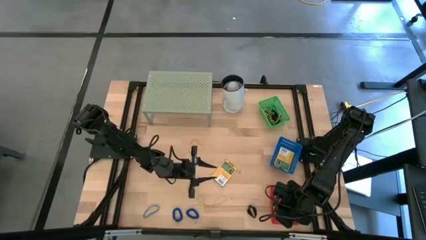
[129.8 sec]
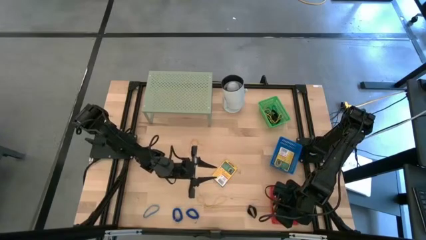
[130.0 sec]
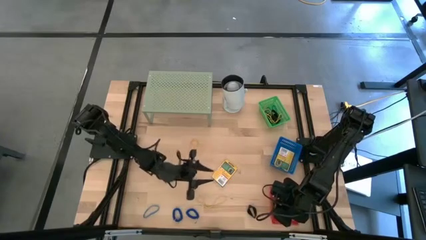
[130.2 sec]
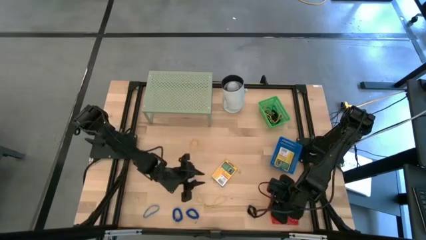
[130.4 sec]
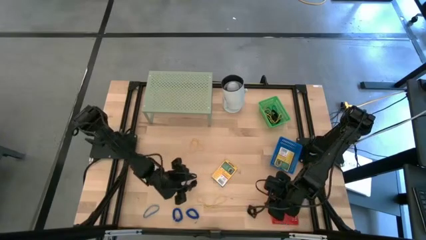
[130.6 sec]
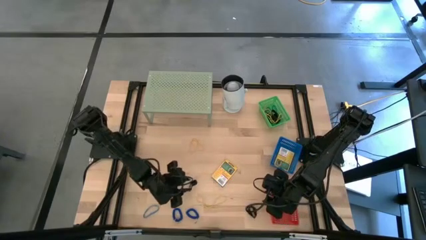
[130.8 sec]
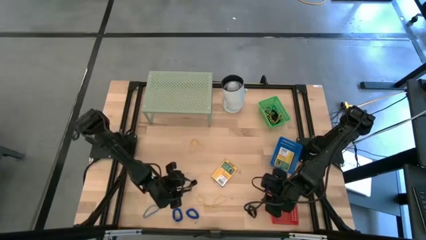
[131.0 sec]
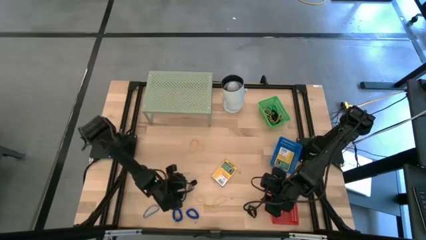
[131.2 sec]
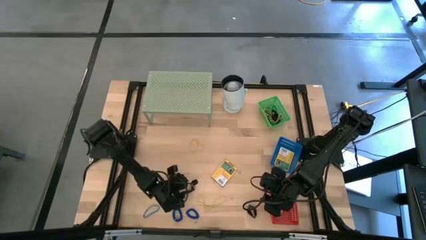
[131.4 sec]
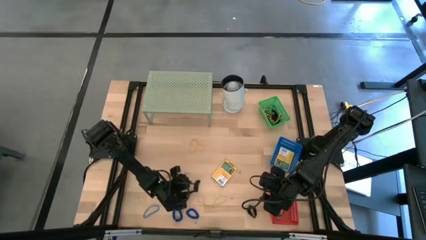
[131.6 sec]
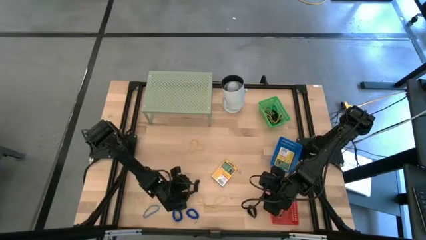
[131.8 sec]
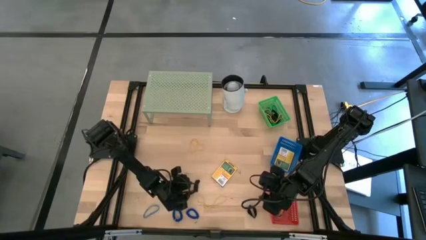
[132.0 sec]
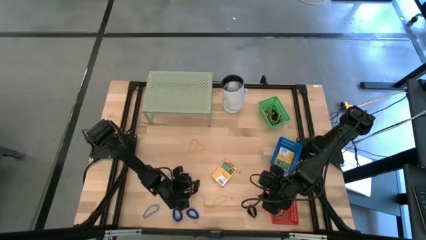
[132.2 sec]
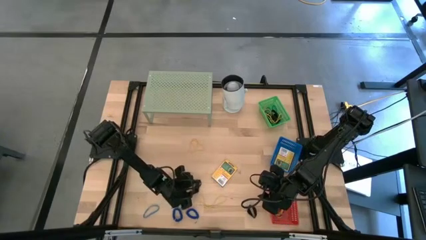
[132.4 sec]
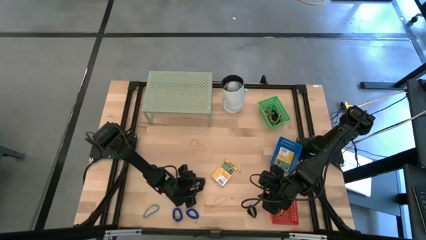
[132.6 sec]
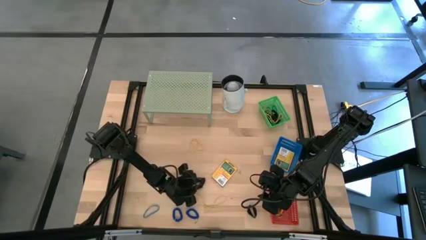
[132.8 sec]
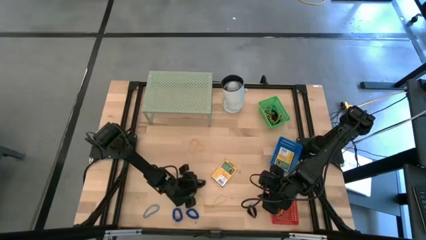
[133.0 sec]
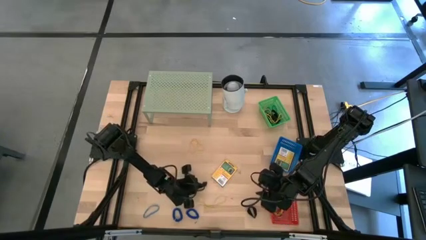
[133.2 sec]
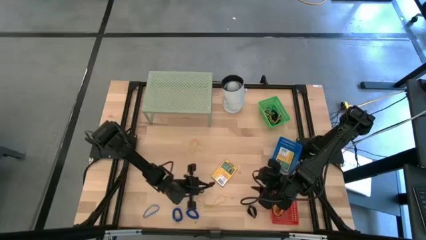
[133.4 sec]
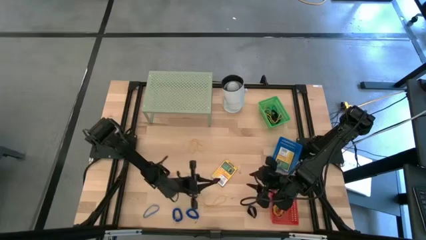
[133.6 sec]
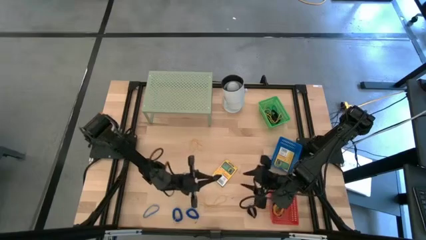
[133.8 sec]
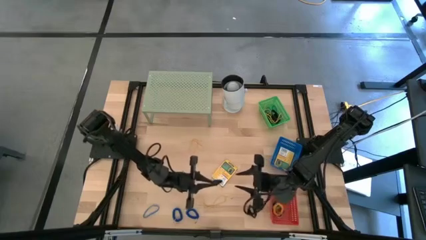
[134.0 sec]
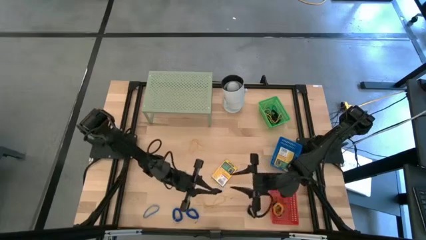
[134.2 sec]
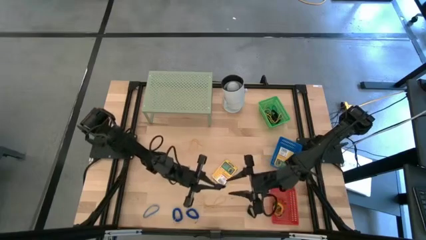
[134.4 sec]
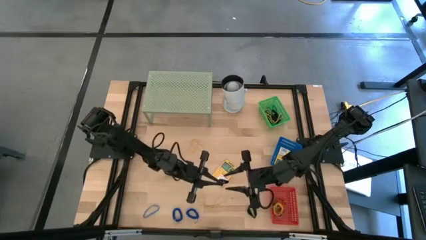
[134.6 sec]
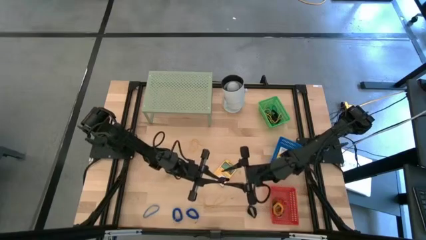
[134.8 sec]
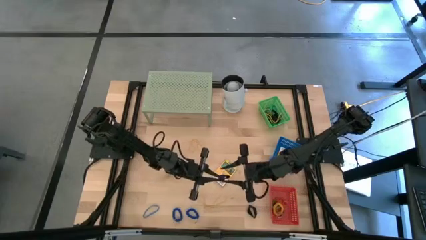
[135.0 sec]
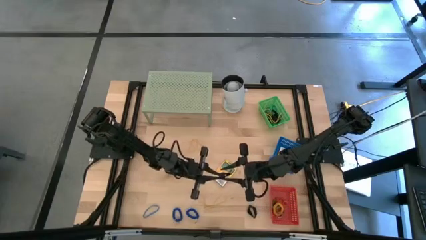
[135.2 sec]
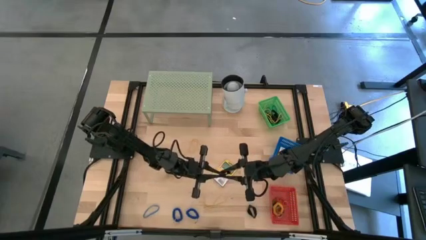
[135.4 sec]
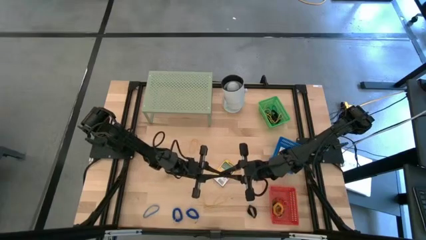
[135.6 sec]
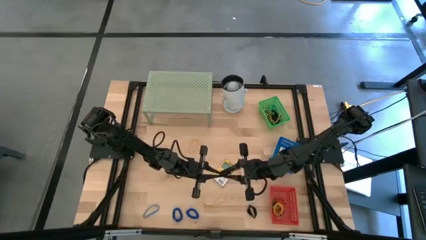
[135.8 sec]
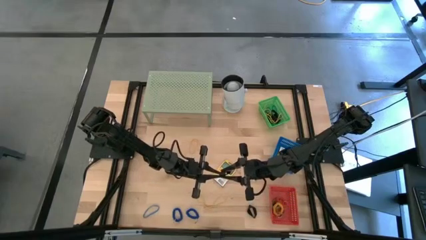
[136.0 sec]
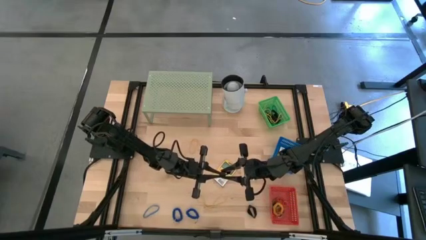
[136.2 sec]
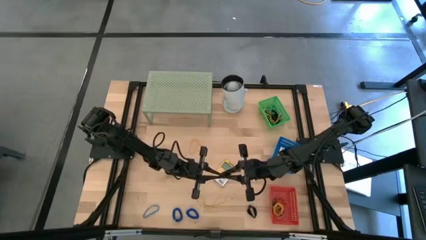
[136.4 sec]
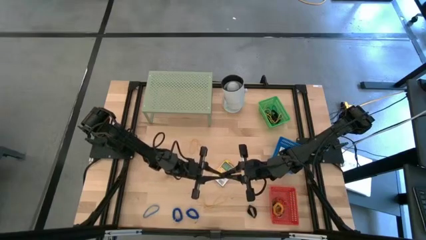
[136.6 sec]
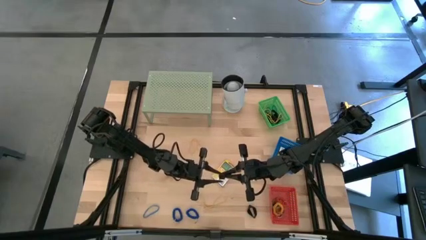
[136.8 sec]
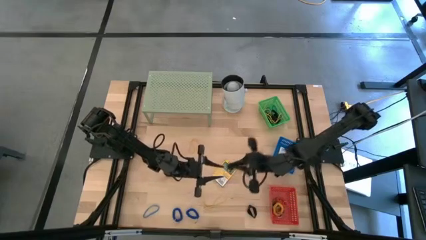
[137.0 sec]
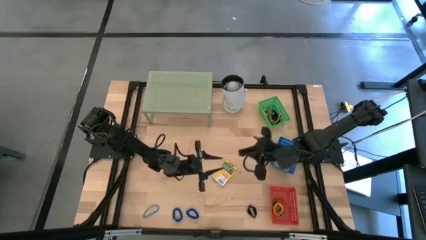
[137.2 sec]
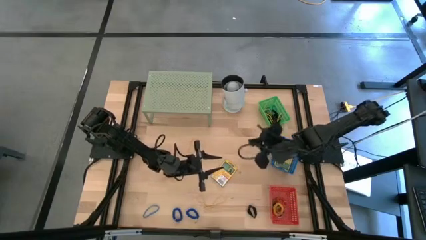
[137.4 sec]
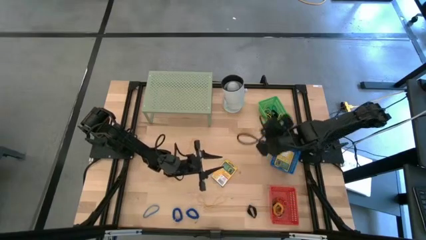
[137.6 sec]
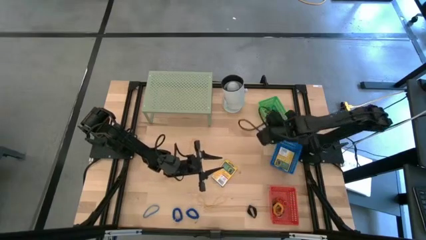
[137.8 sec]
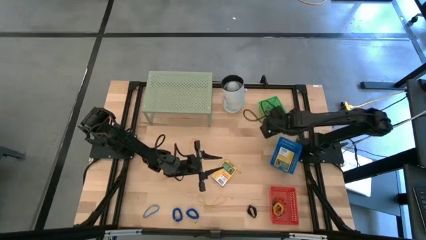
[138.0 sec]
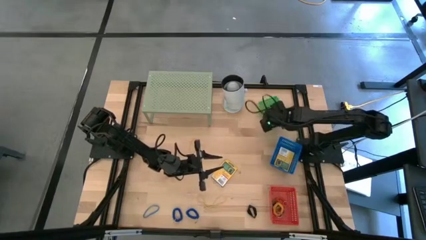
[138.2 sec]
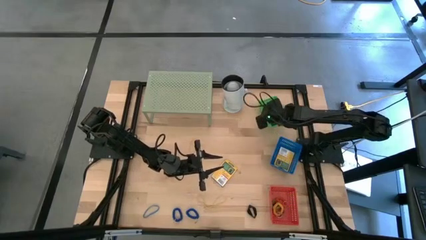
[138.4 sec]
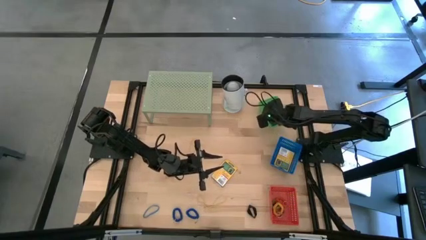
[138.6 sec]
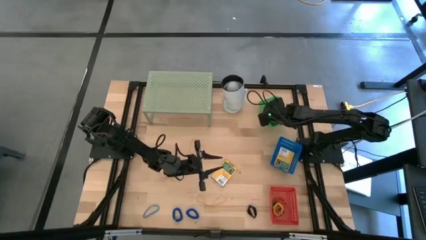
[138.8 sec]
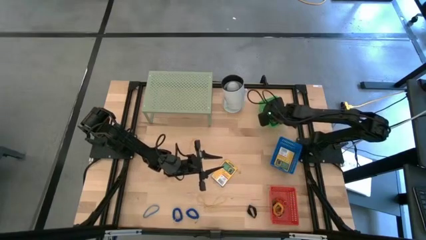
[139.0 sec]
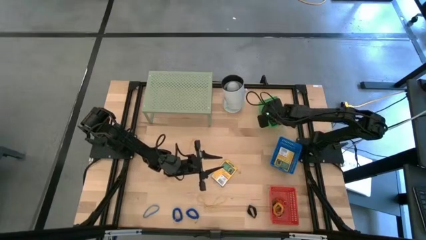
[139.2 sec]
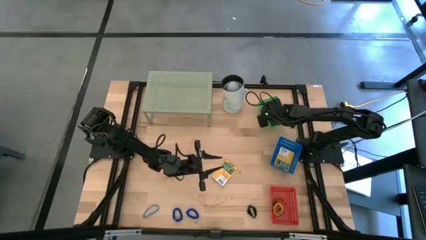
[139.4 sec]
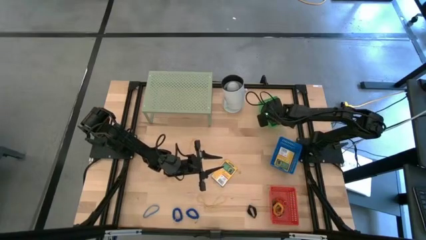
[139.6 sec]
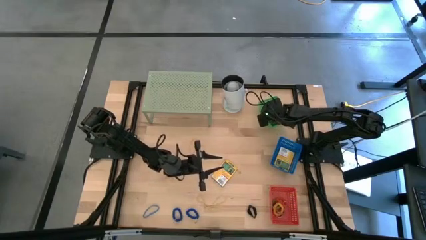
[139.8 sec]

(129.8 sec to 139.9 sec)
Task: Pick & Place Office Desk Supplies
Put the black rubber band into the green bin

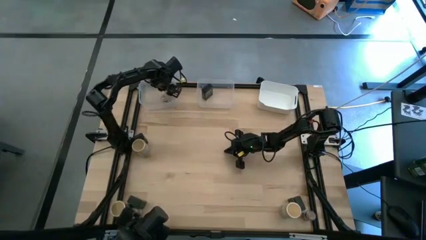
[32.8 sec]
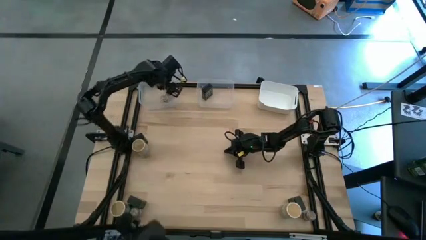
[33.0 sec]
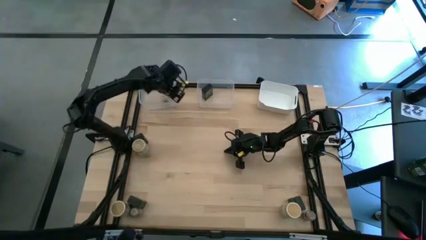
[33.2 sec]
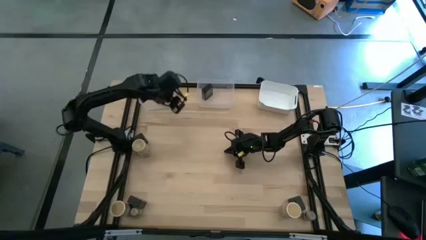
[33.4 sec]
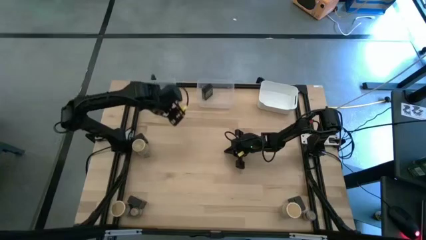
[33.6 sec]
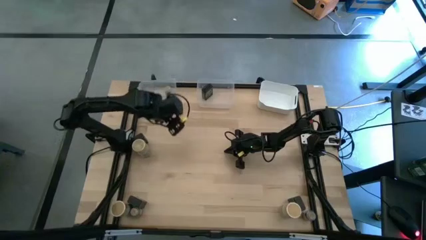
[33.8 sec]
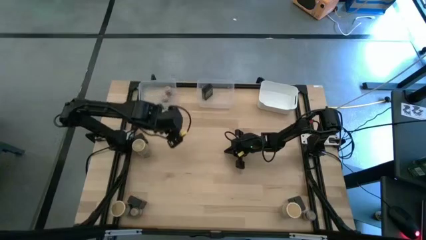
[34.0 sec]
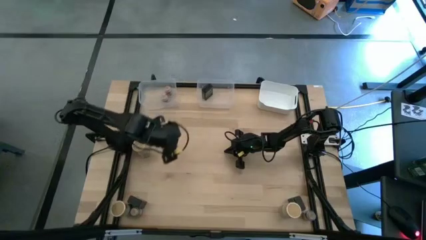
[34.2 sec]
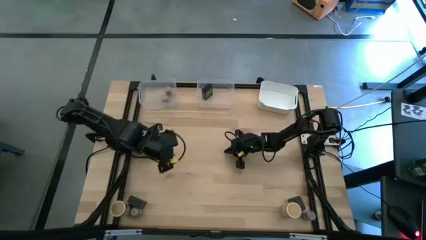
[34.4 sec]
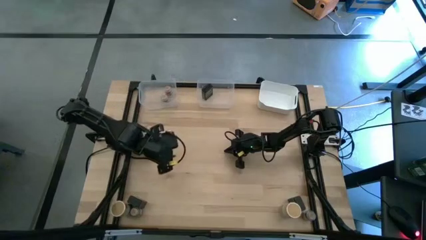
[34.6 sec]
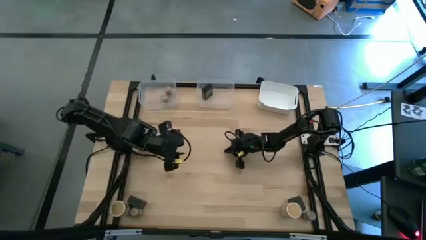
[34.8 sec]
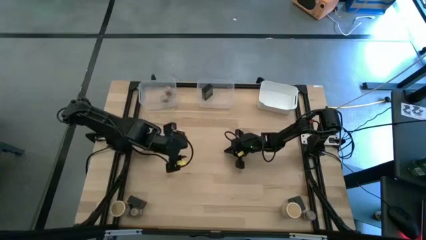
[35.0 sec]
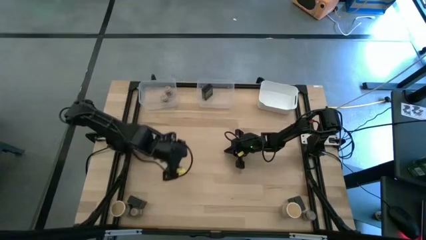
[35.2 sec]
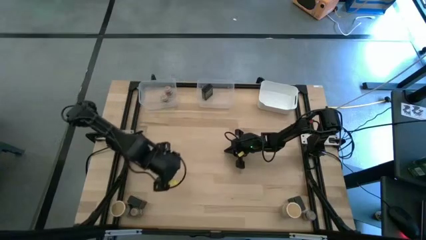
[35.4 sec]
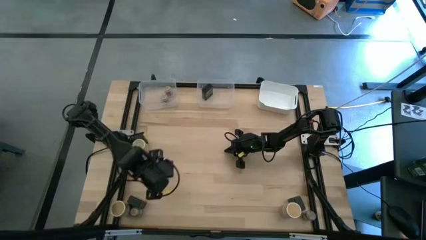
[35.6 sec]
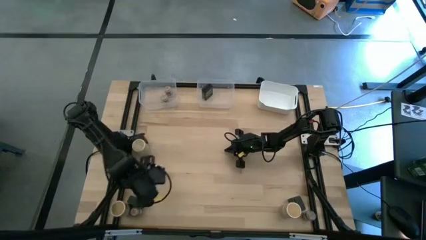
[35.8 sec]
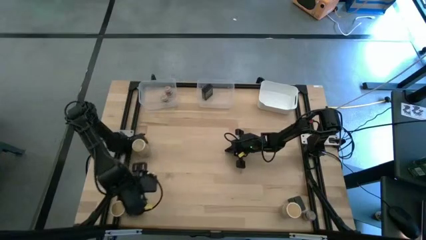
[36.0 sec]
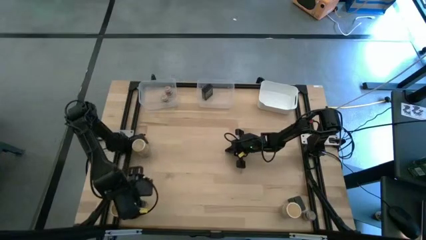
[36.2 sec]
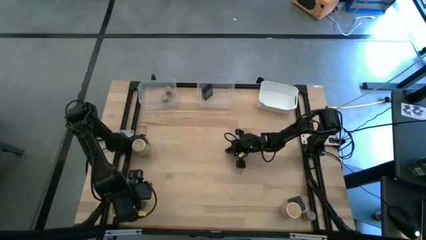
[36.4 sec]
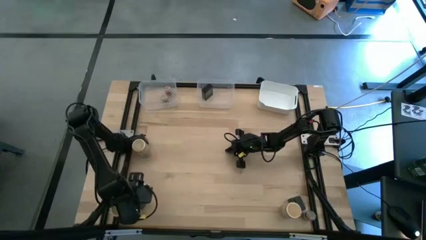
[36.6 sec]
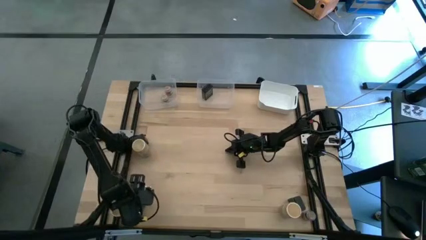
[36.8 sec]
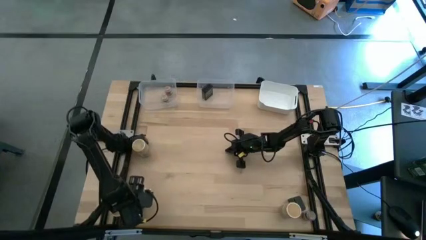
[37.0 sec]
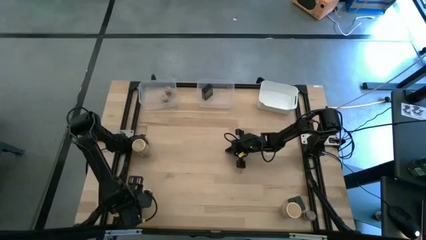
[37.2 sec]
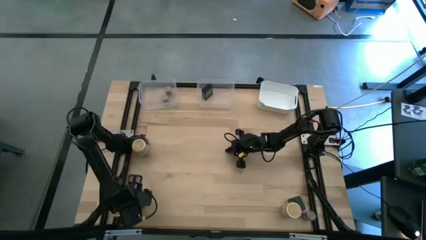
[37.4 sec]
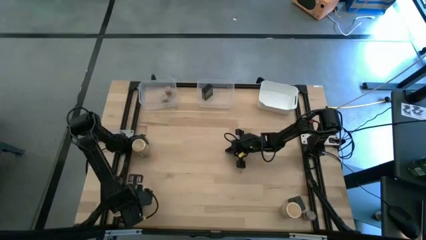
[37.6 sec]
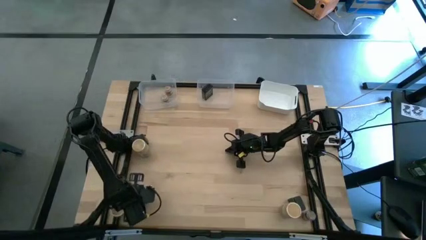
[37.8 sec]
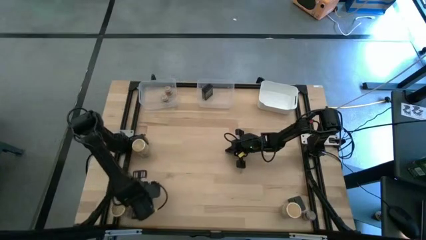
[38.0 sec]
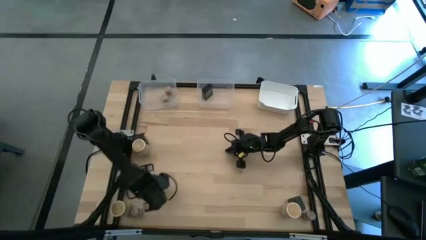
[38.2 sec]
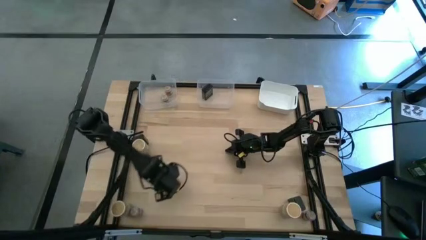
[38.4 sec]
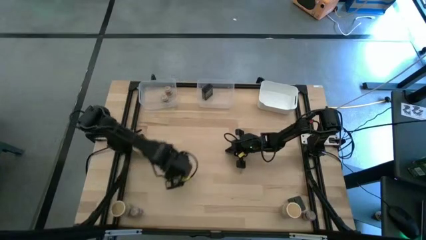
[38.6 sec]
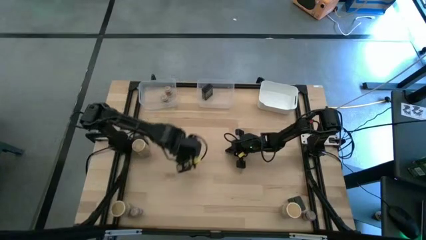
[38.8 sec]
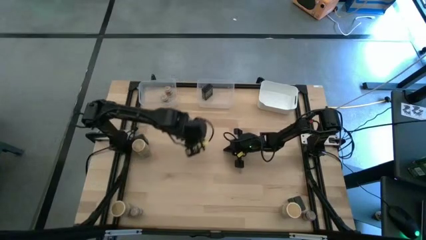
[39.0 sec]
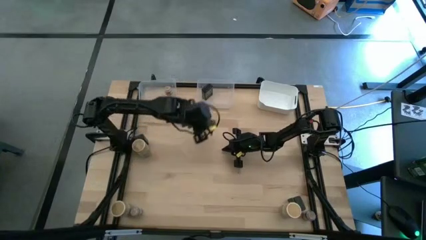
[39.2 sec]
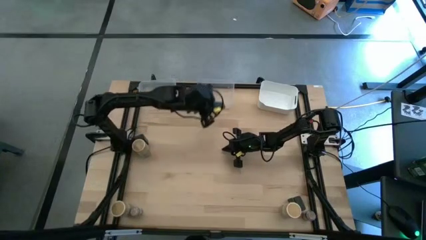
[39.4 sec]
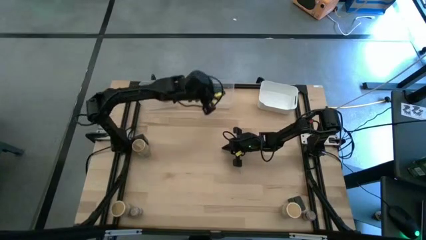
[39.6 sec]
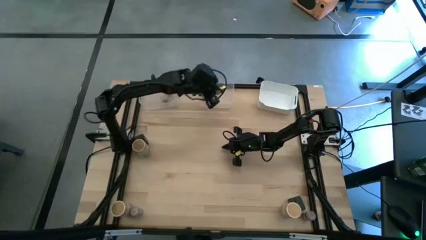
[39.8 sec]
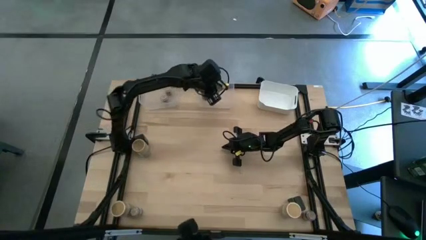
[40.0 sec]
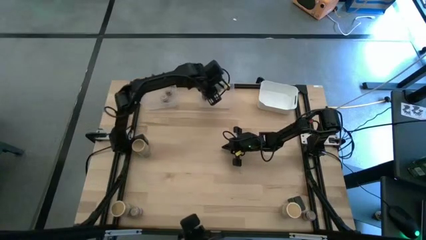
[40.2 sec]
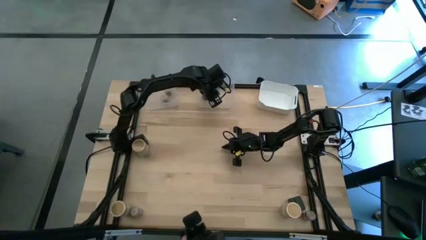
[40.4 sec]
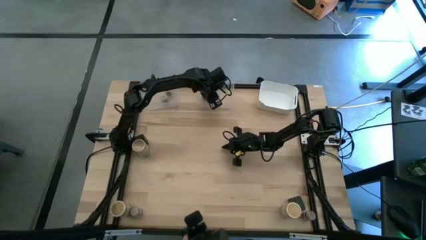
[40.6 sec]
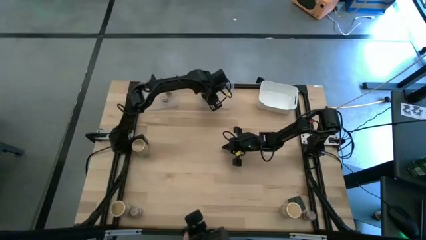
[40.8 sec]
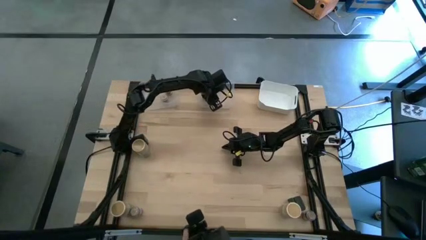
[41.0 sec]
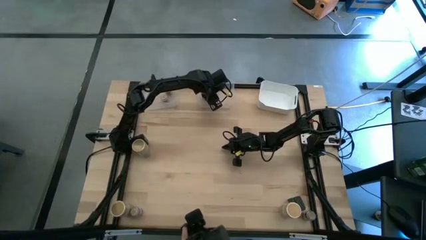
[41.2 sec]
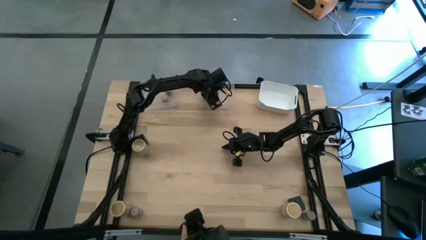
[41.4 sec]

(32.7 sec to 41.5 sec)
Task: Sort spices by type
Put the bottom left black seasoning can into the middle transparent bin
